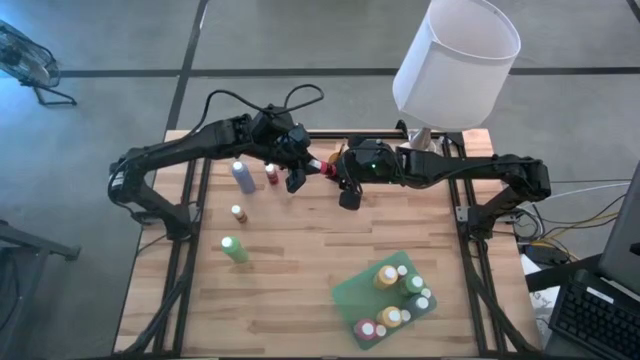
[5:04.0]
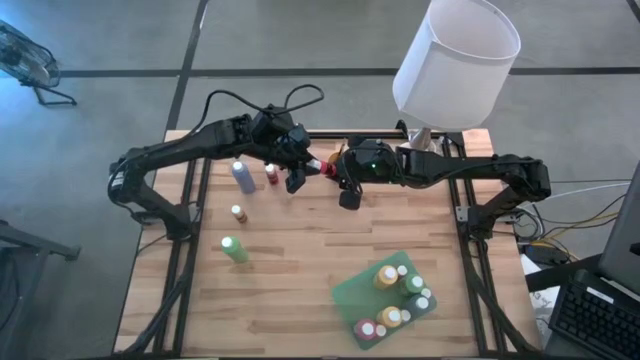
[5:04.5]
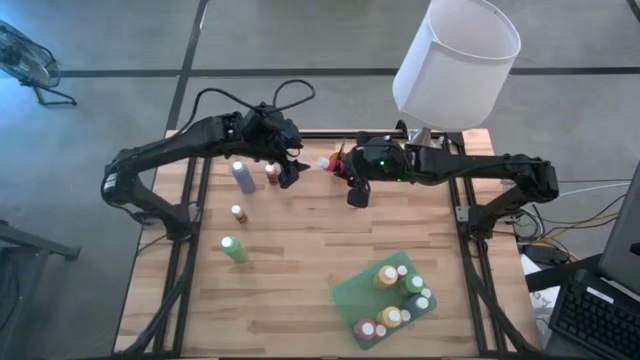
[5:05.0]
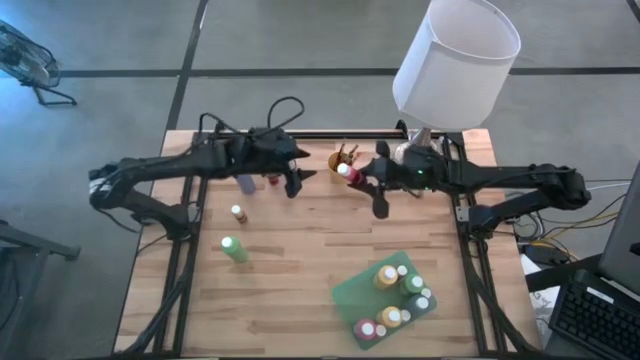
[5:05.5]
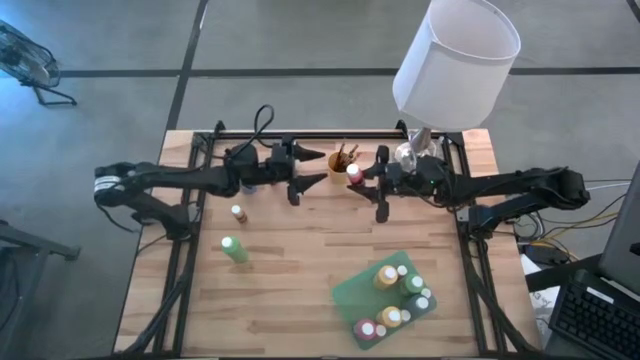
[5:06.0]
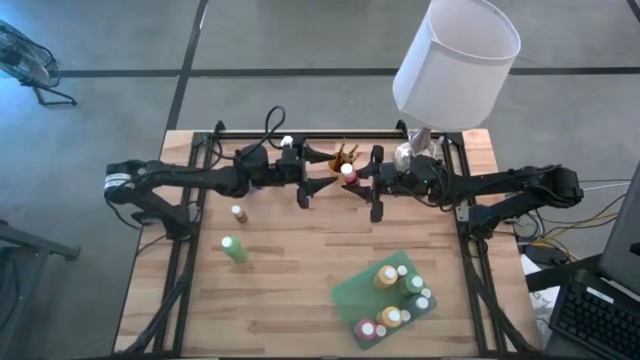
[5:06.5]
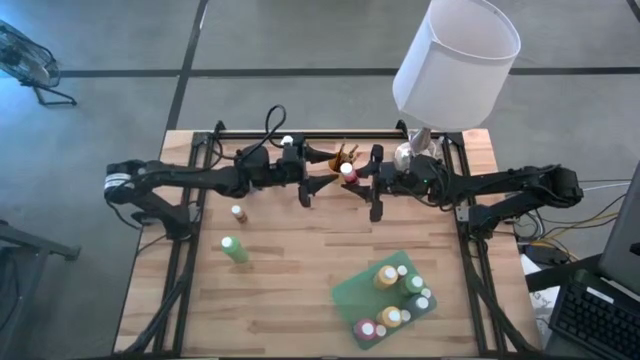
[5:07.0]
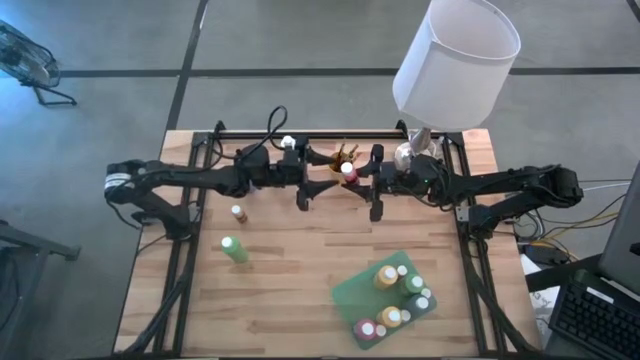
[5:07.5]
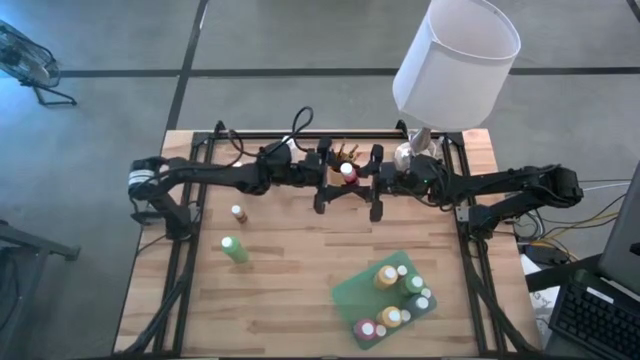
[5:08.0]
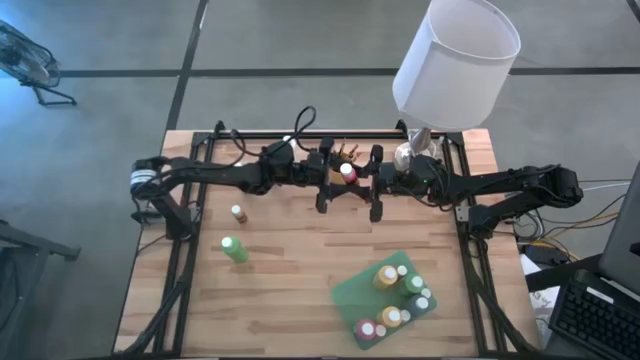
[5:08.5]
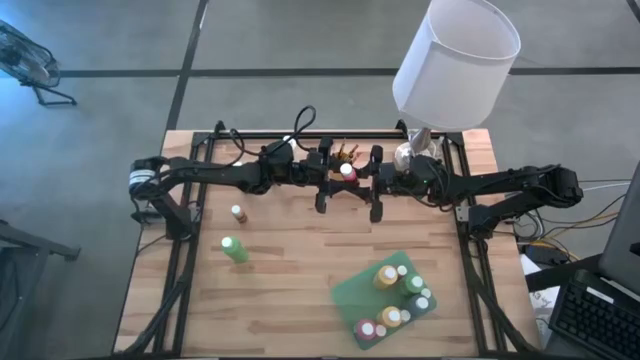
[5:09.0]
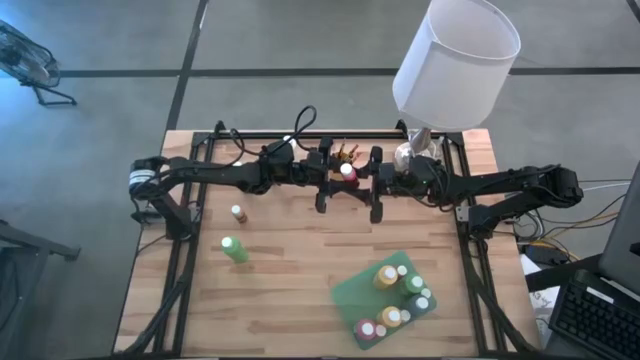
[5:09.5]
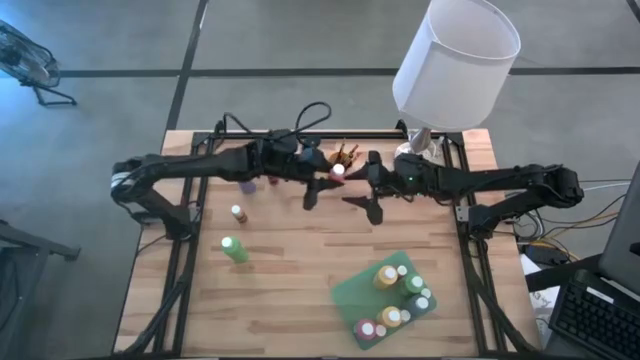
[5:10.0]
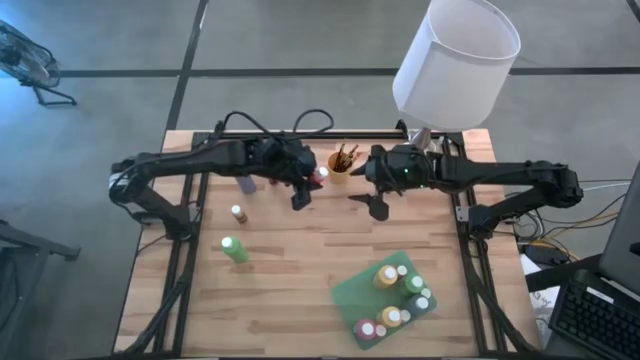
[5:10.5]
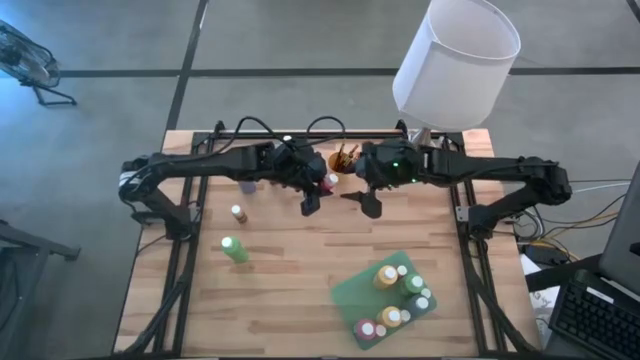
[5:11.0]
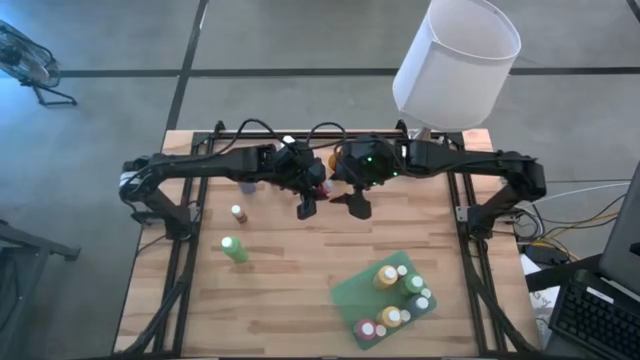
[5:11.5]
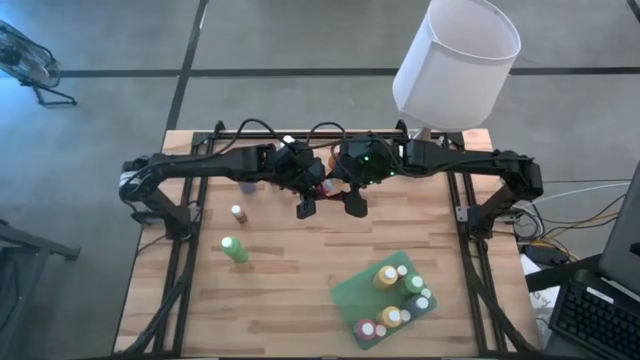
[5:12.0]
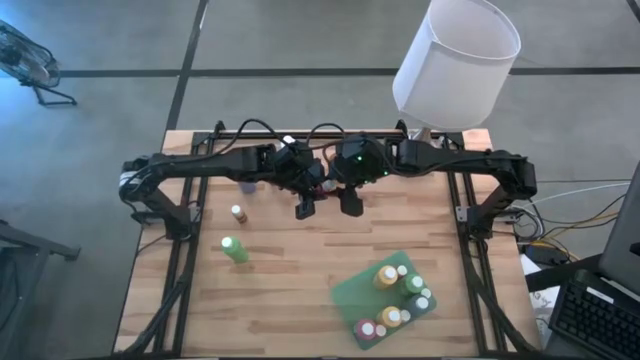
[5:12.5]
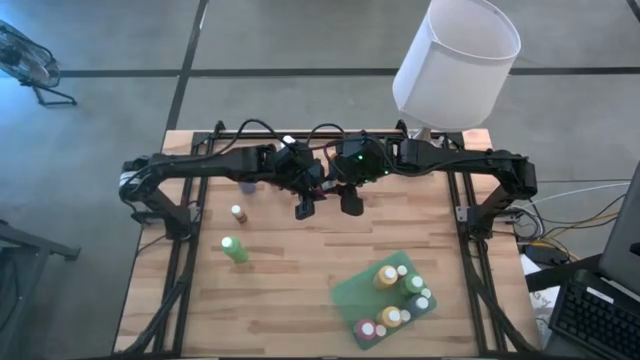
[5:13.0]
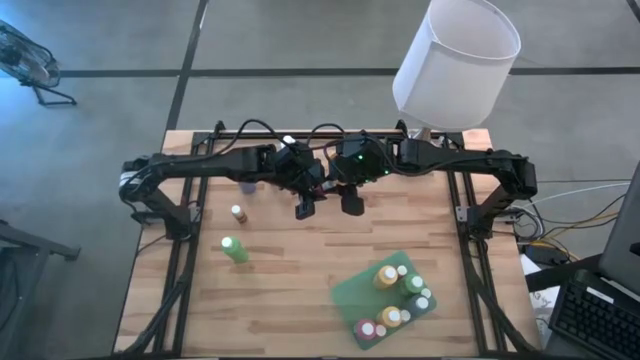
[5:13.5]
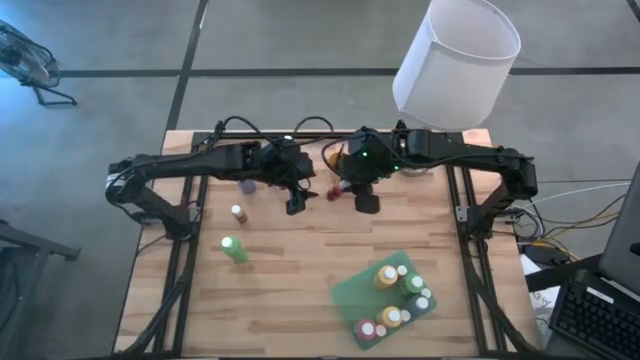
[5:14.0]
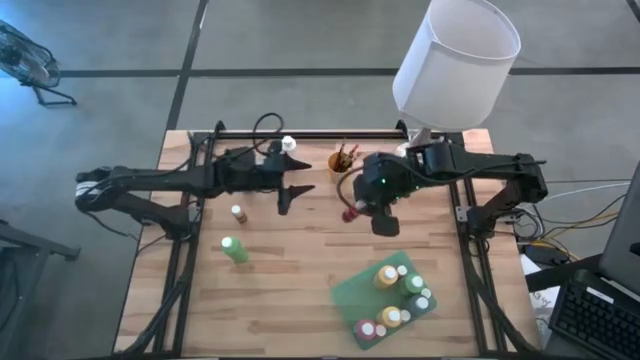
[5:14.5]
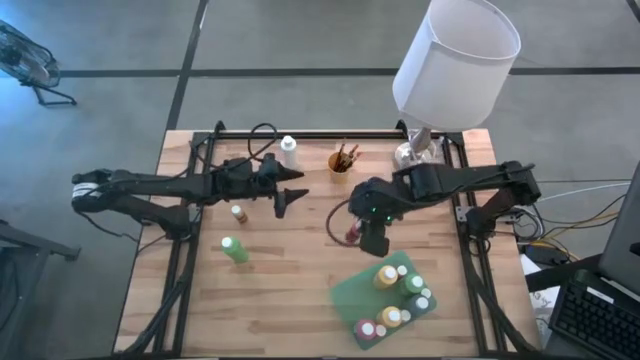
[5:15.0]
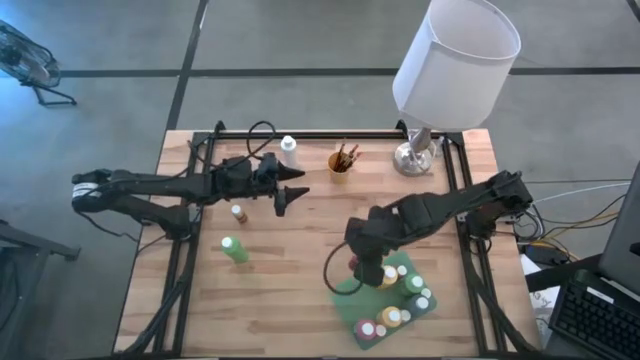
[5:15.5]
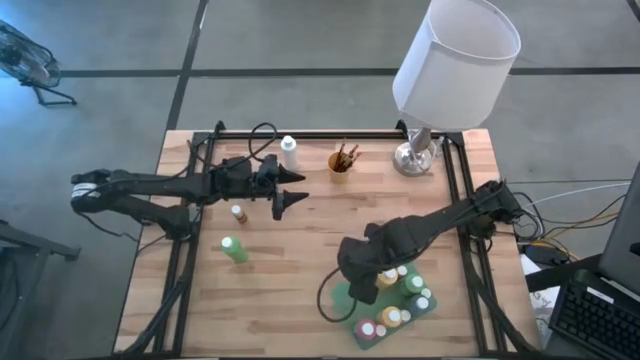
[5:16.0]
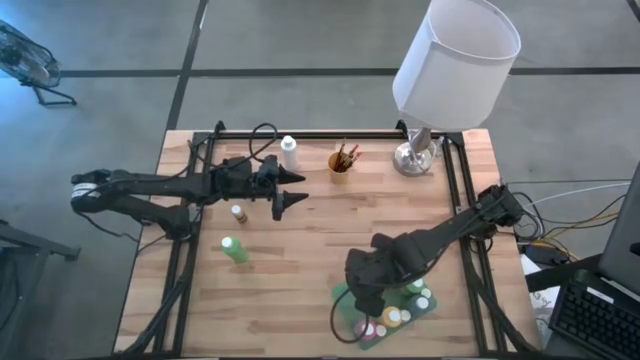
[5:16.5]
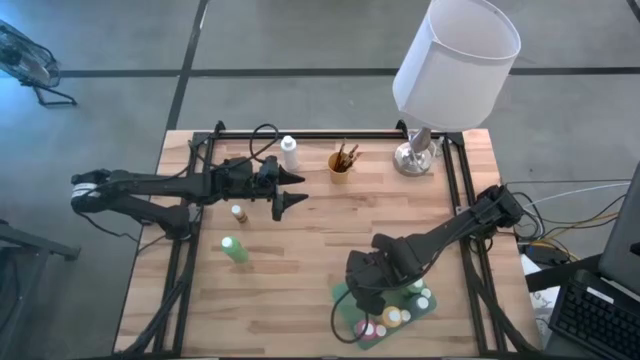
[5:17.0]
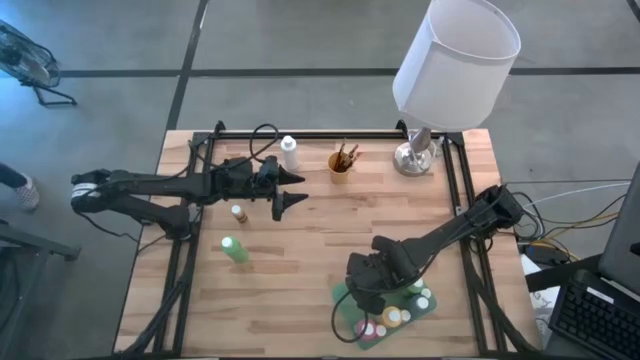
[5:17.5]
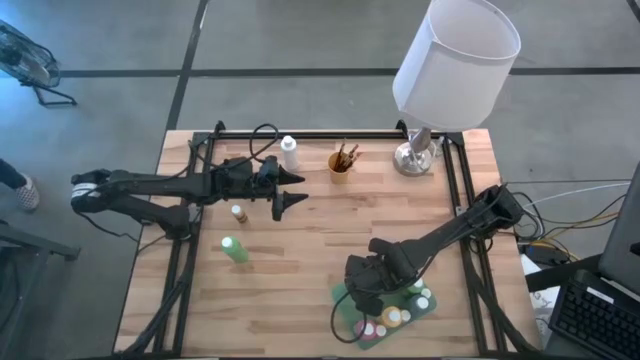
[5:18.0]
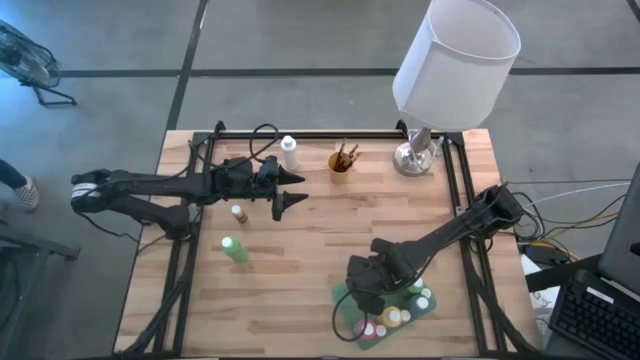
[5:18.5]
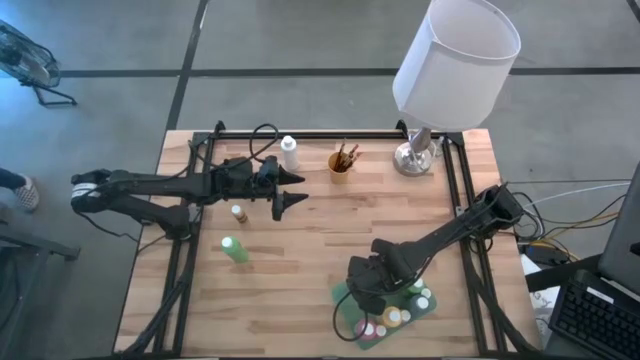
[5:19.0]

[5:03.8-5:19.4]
Task: Pick & Place Paint Supplies
Put the red paint bottle into the green bin

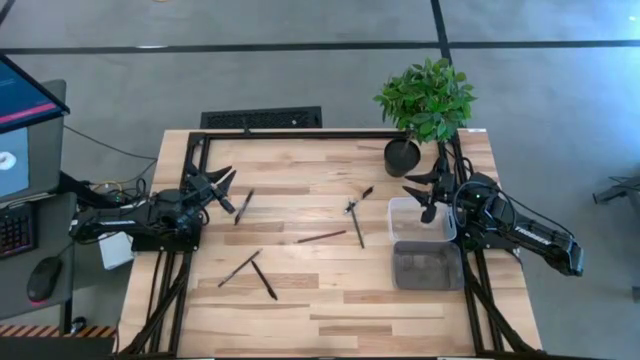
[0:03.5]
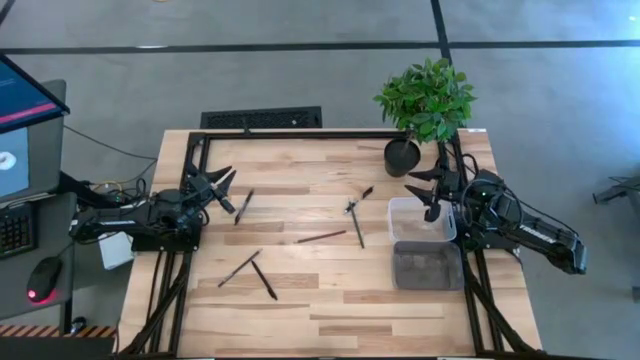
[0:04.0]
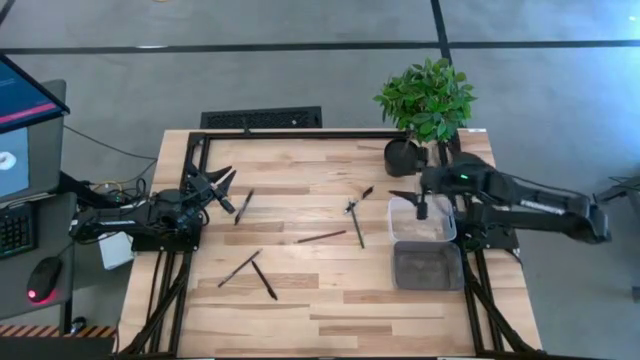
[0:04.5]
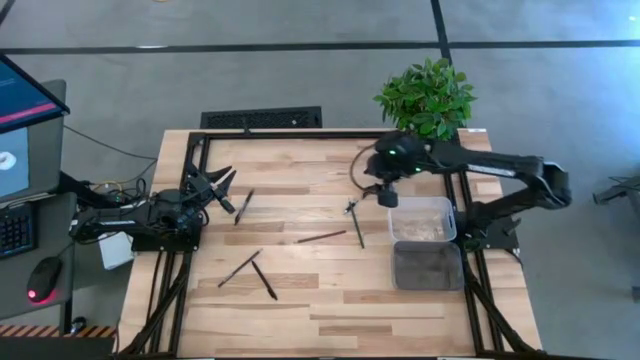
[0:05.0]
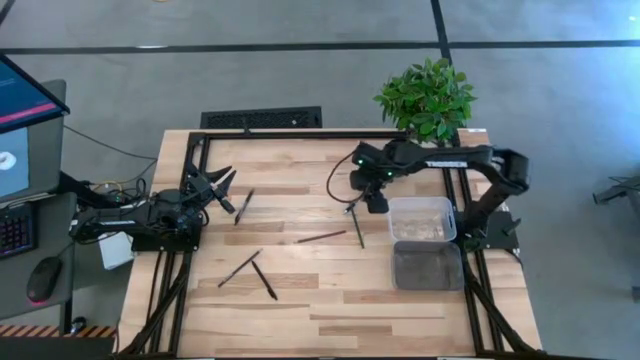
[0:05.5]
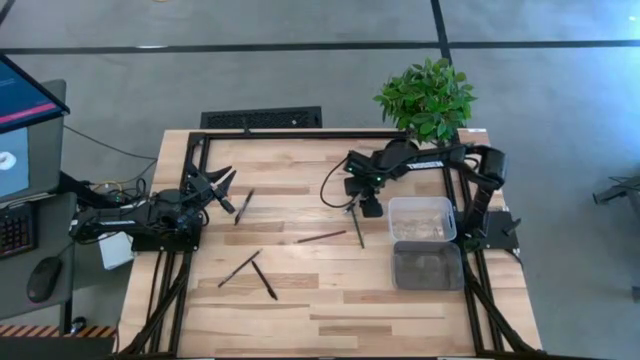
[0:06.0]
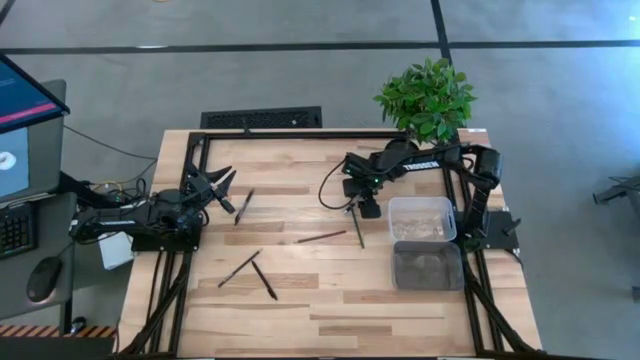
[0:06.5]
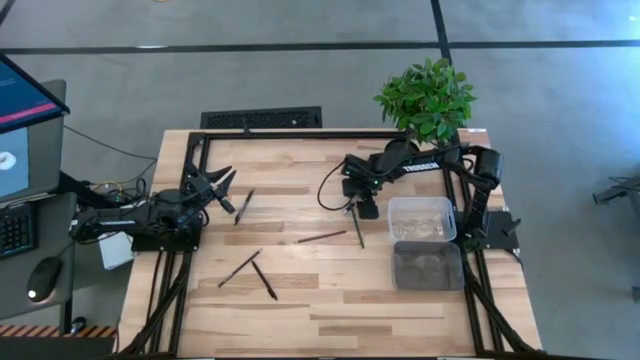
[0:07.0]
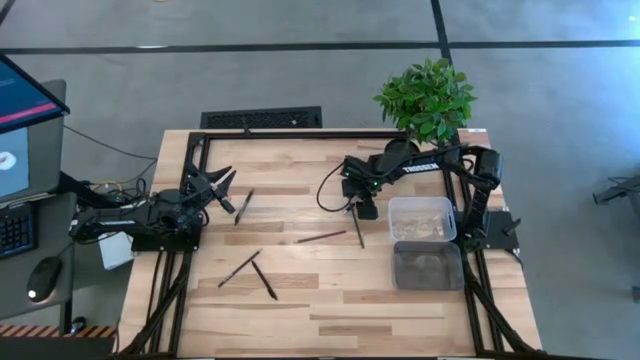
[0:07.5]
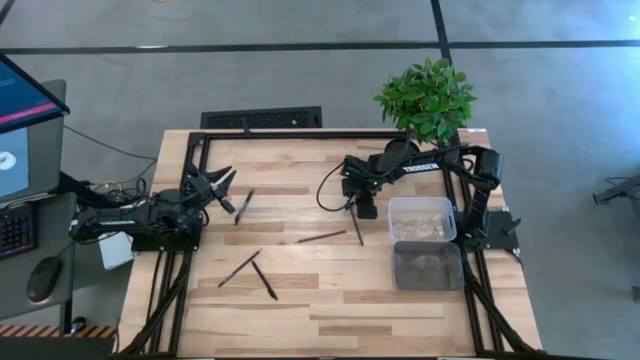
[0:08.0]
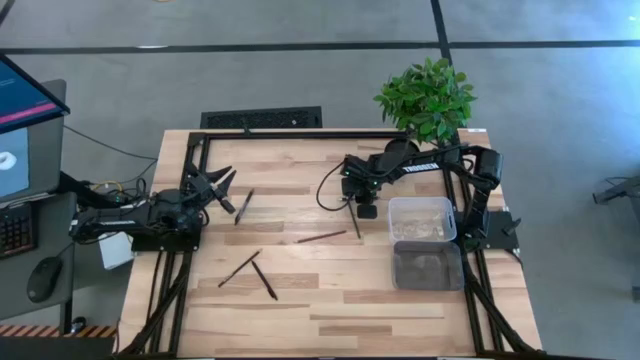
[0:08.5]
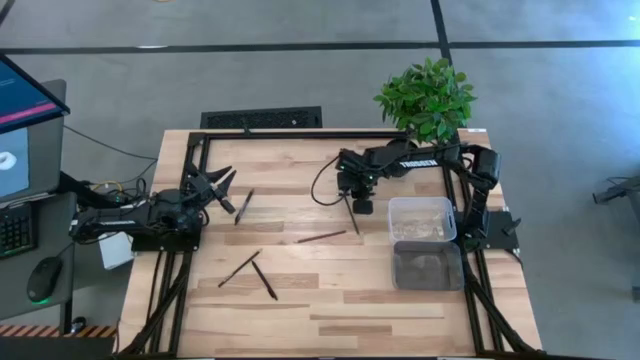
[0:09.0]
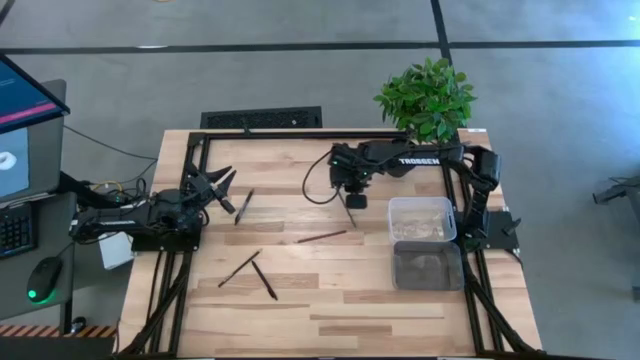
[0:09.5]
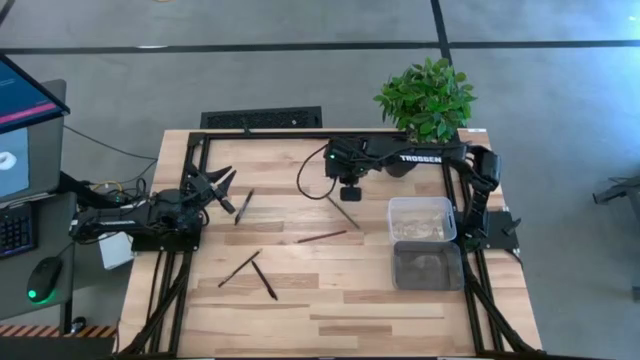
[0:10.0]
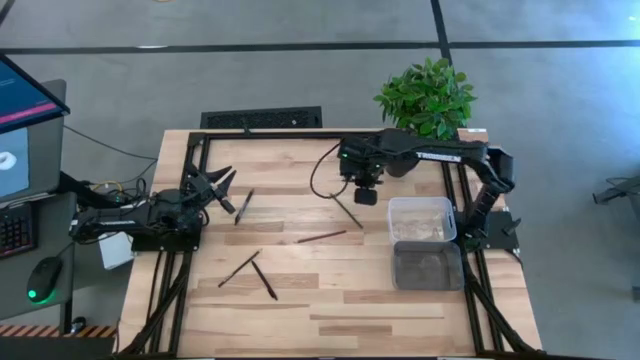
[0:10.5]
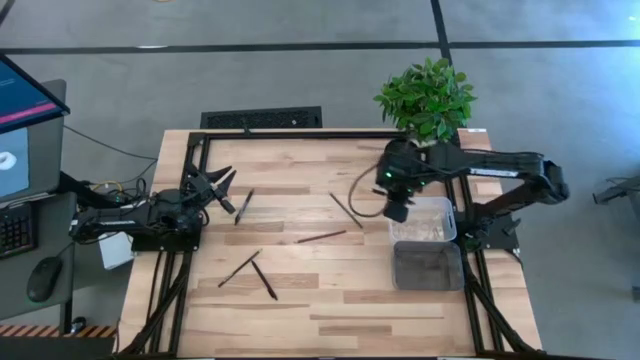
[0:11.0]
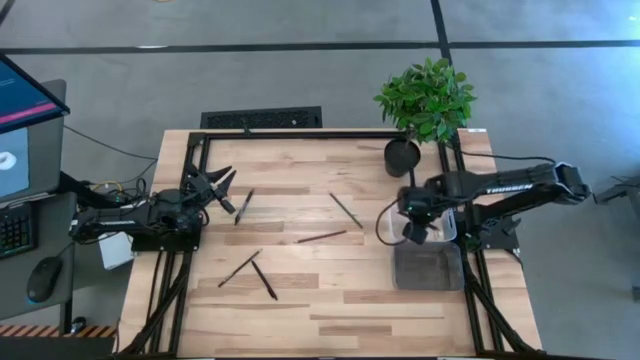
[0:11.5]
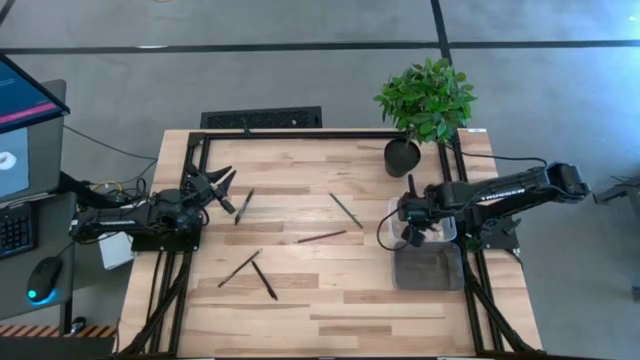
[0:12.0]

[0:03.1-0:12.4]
Task: Sort pens & pencils
Put the right black pen into the white transparent bin
